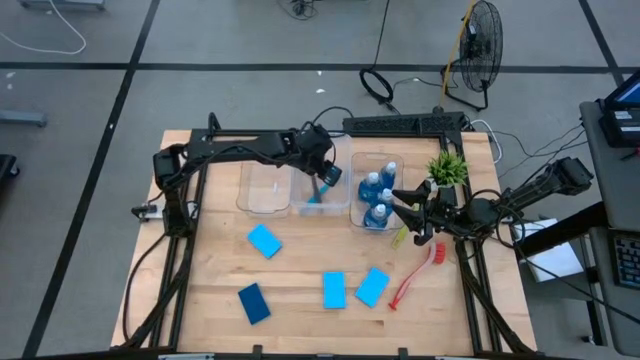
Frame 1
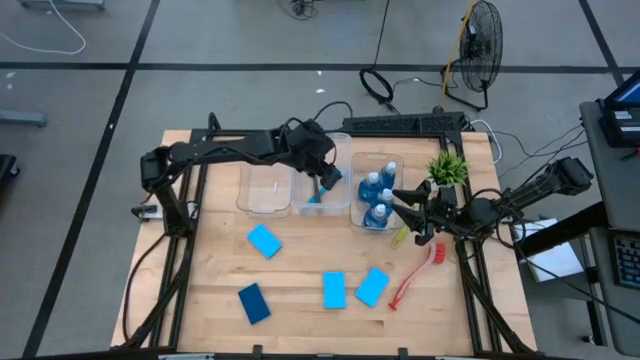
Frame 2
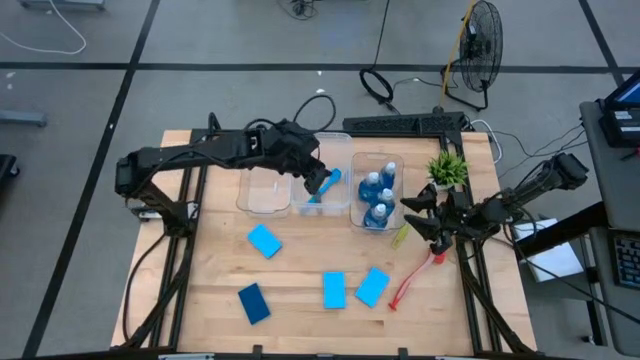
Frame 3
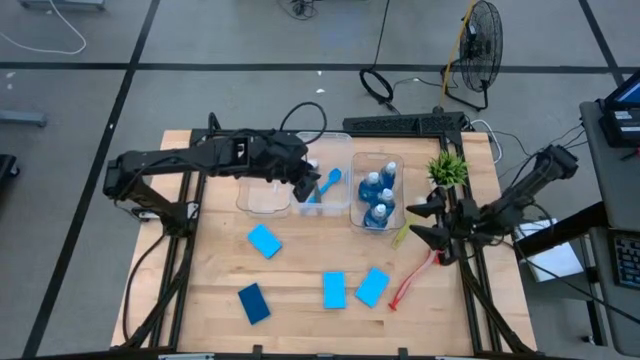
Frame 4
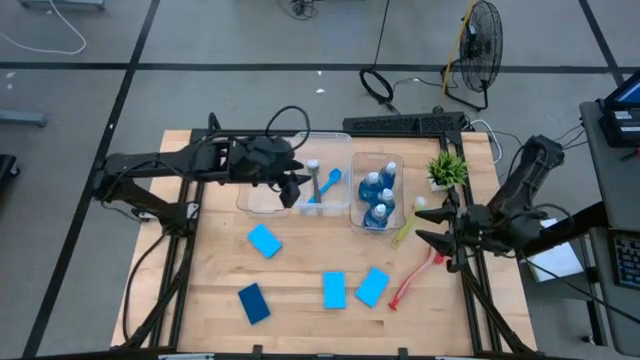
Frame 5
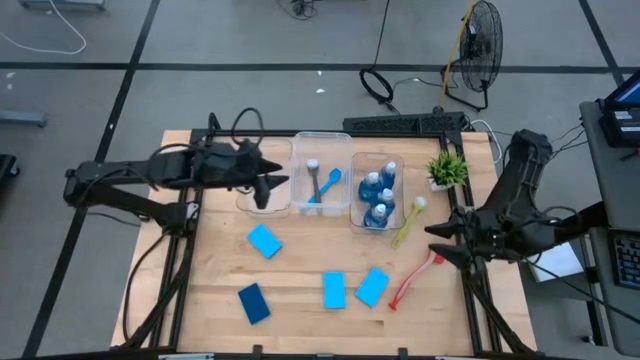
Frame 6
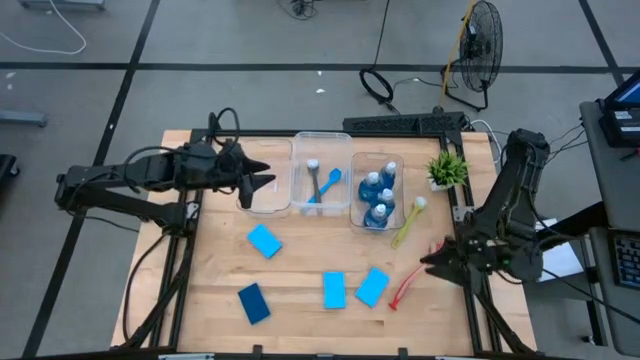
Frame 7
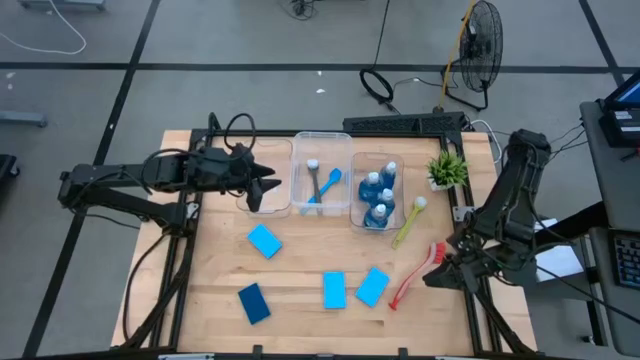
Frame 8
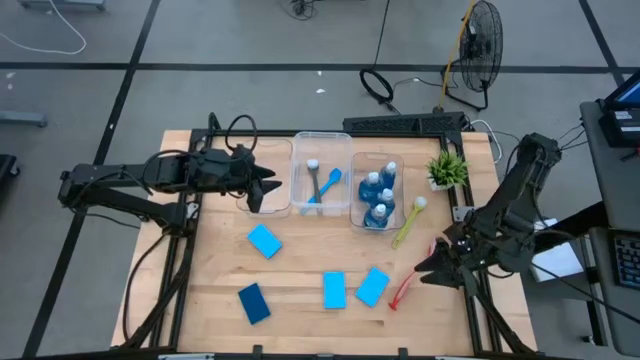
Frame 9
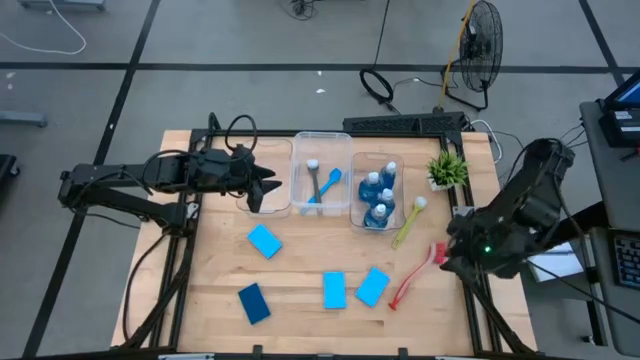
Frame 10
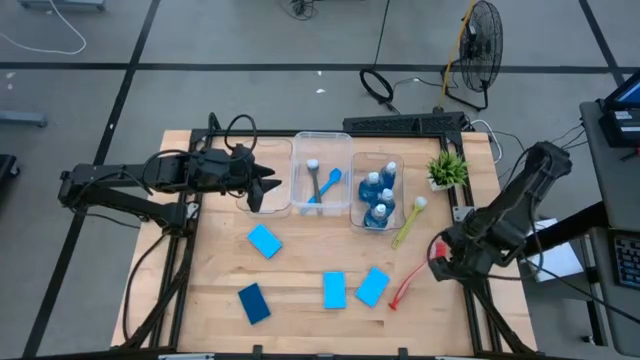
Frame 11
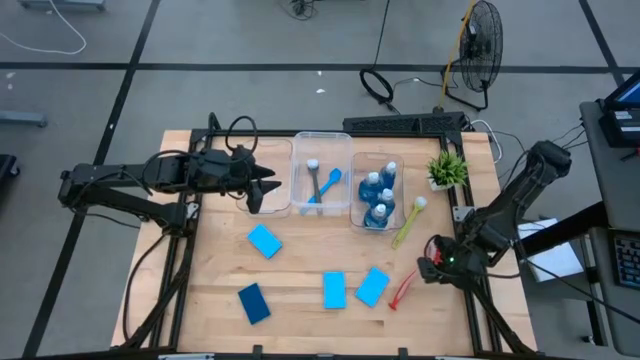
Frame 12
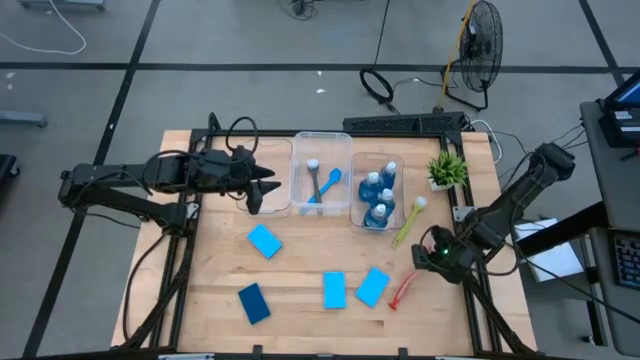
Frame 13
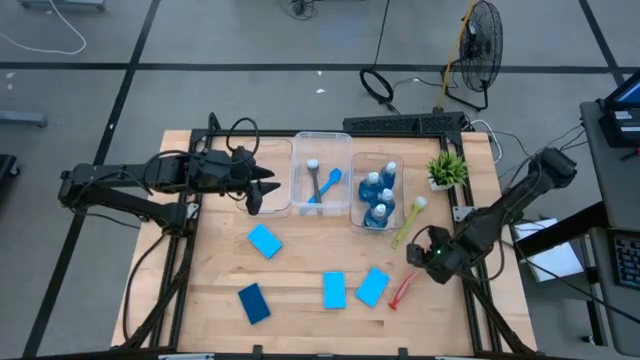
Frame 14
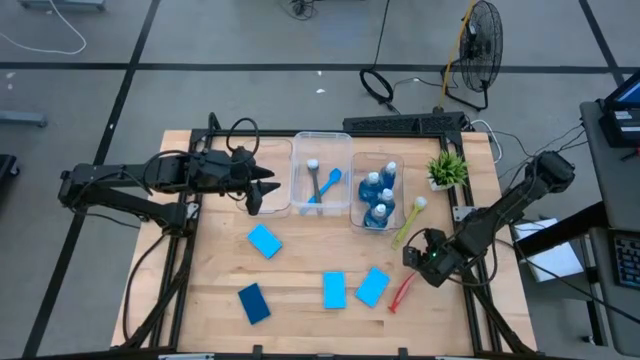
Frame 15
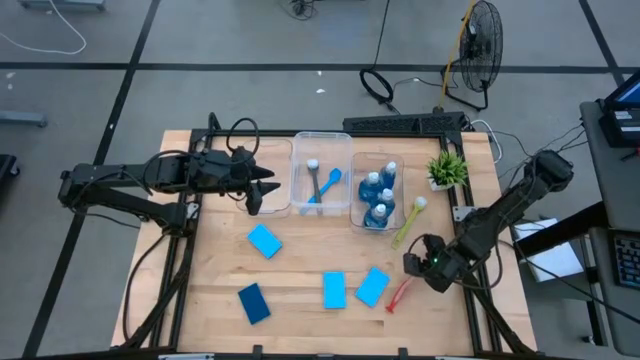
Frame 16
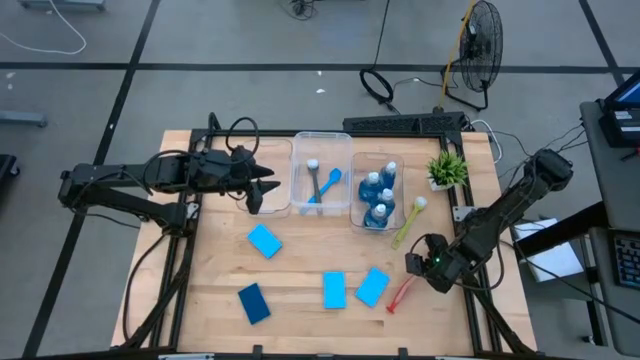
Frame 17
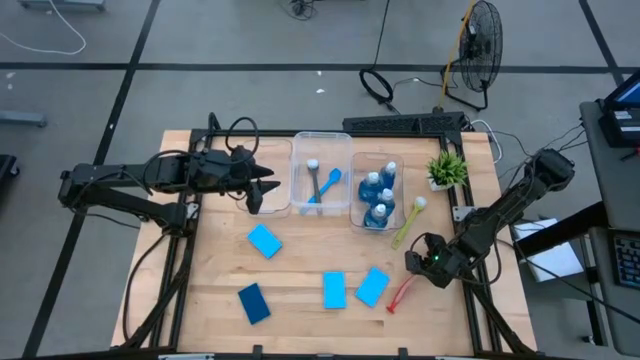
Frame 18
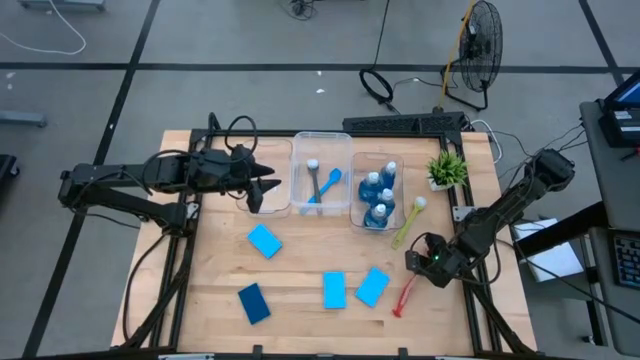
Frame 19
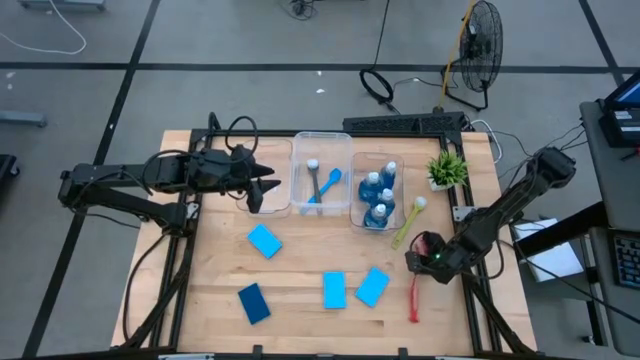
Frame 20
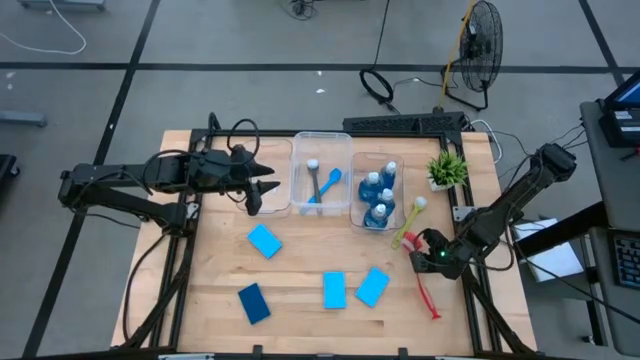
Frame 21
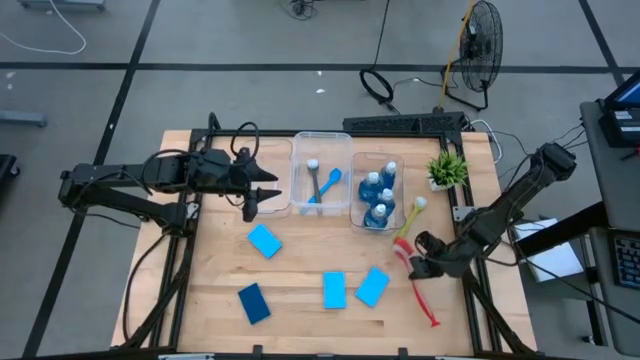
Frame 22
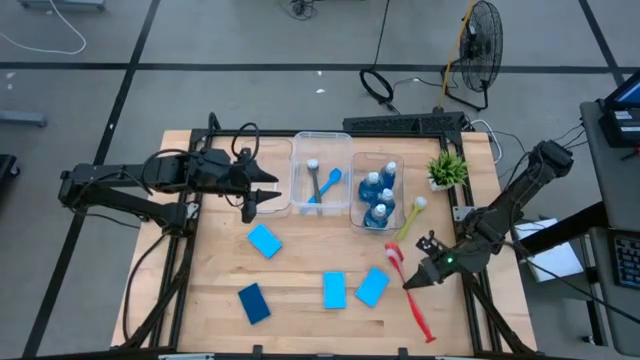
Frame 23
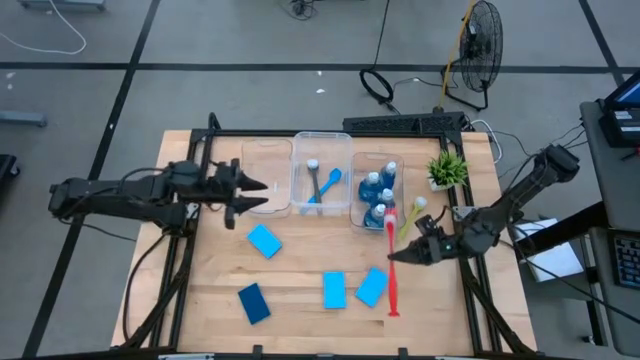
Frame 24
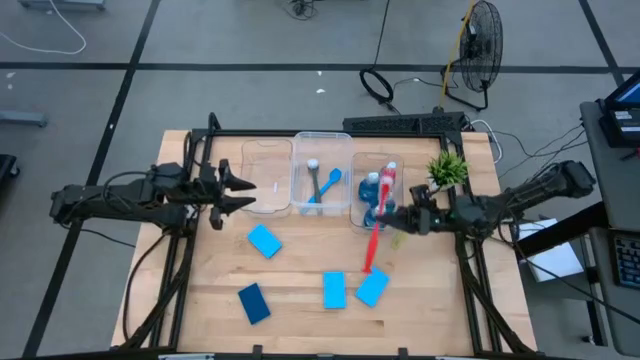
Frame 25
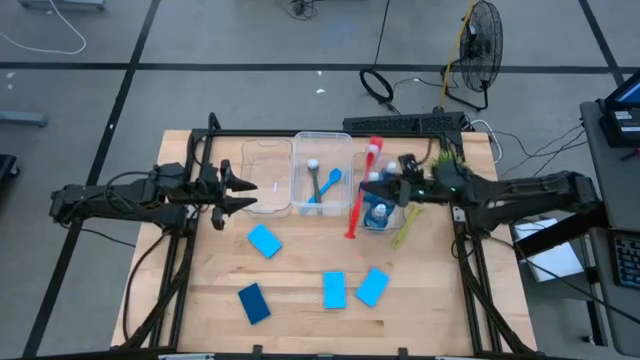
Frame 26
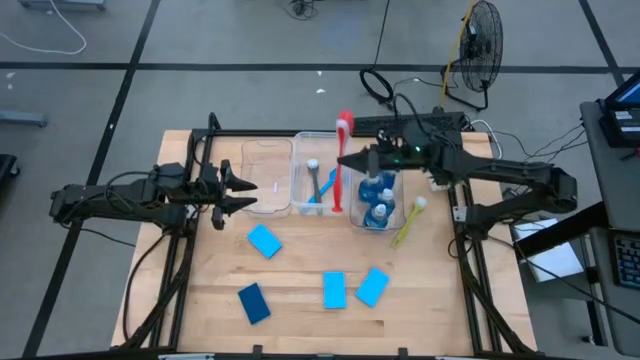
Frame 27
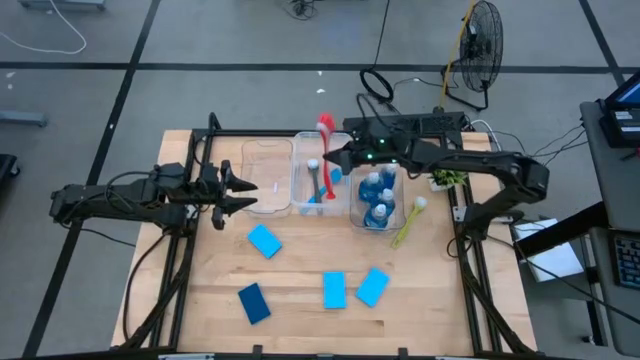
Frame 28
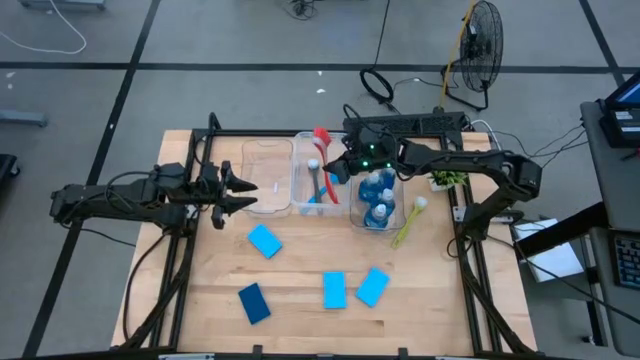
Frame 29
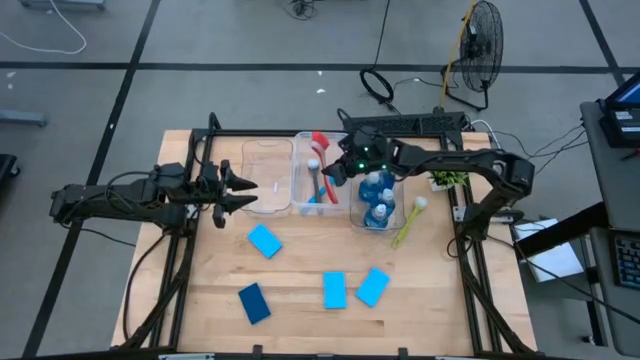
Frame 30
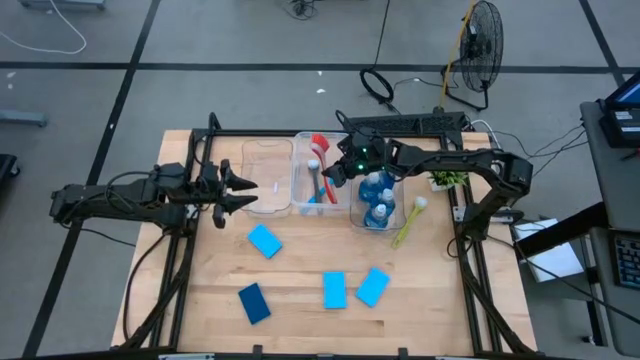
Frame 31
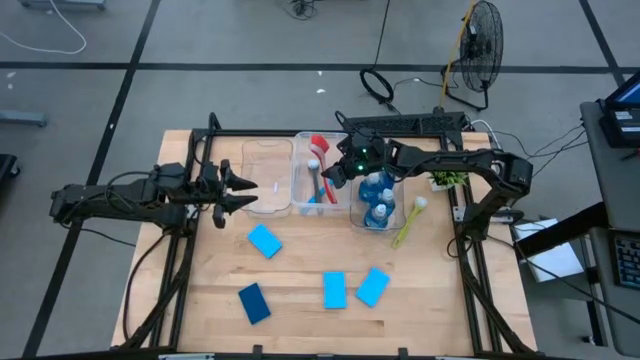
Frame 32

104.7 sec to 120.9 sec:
Task: Pick & Place Kitchen Sink Supplies
Put the red dish brush into the white transparent bin

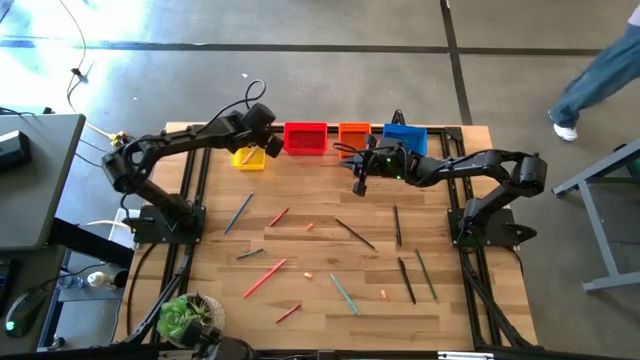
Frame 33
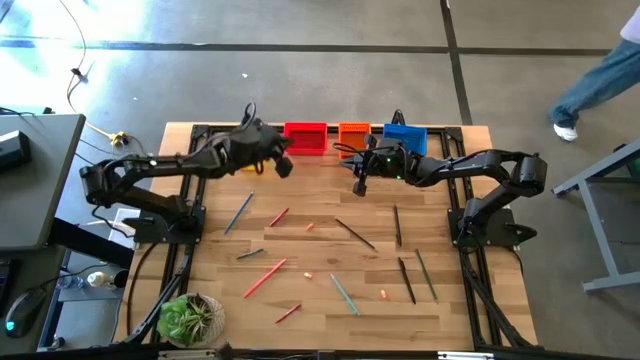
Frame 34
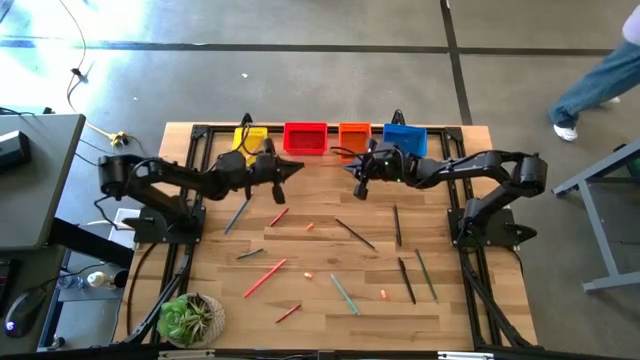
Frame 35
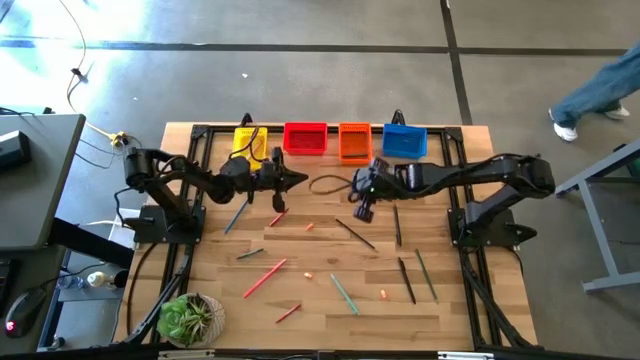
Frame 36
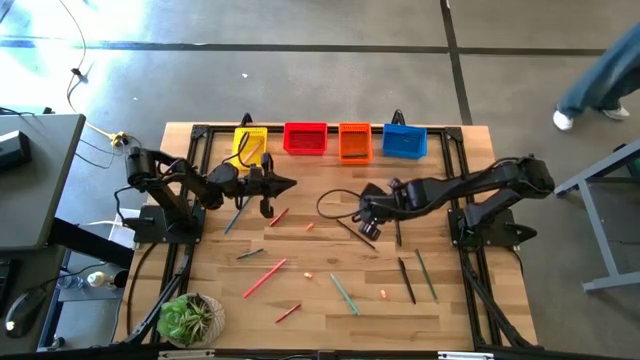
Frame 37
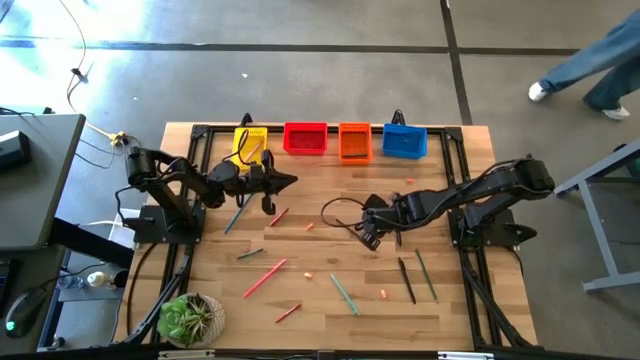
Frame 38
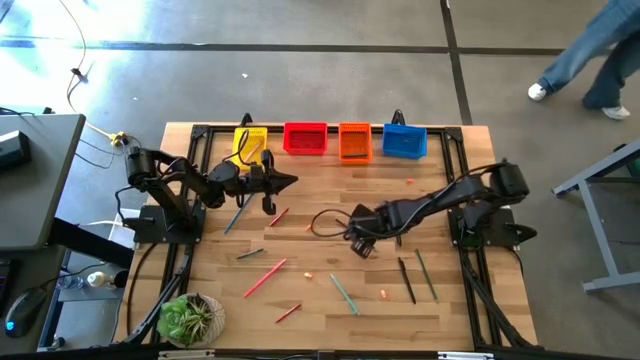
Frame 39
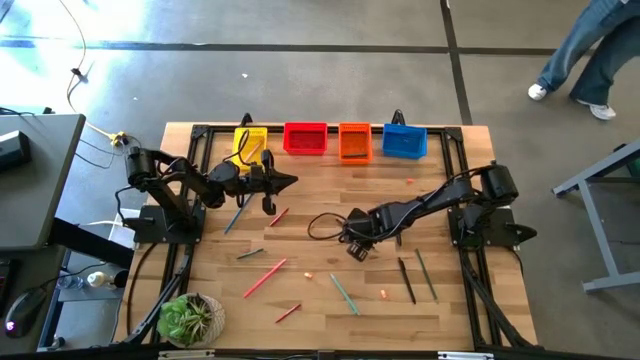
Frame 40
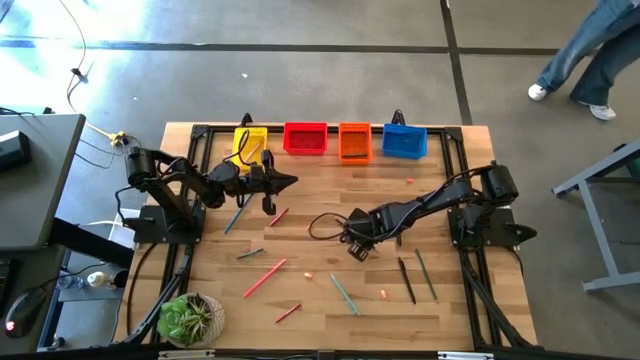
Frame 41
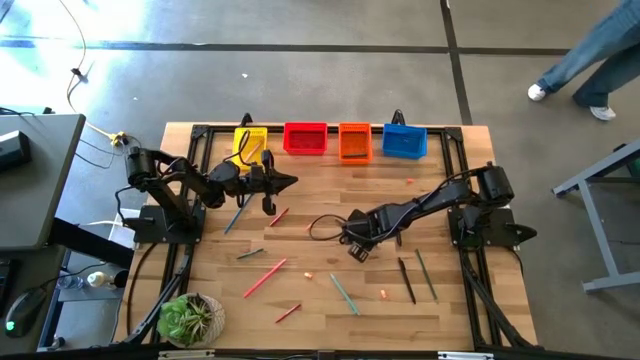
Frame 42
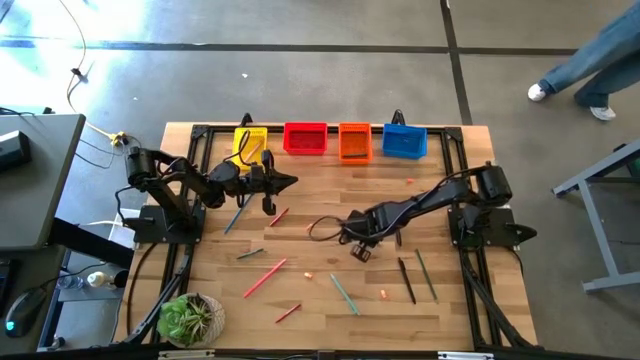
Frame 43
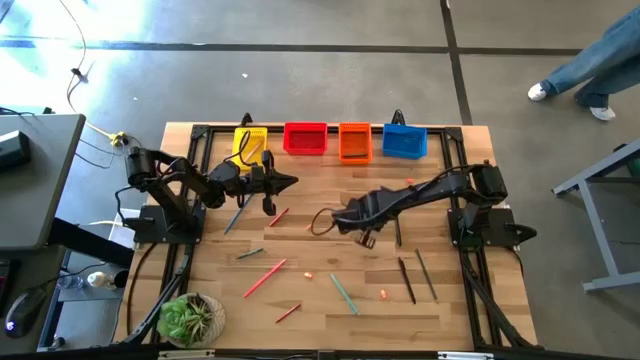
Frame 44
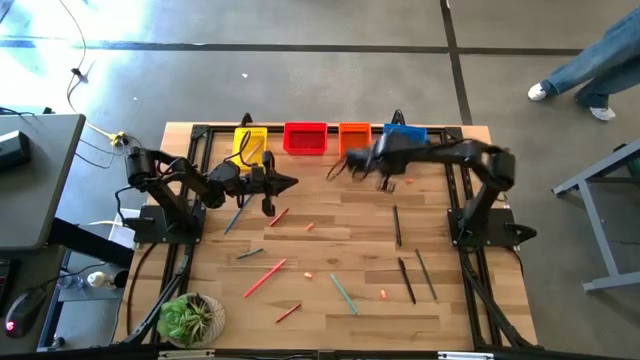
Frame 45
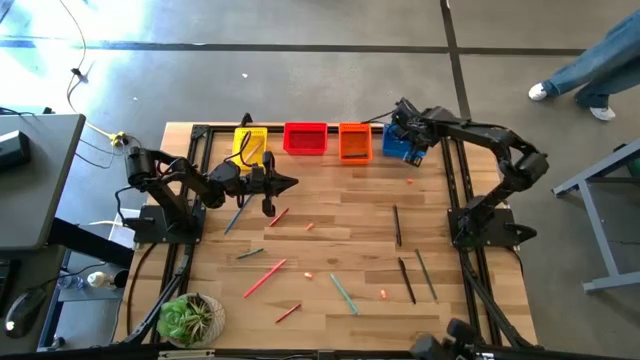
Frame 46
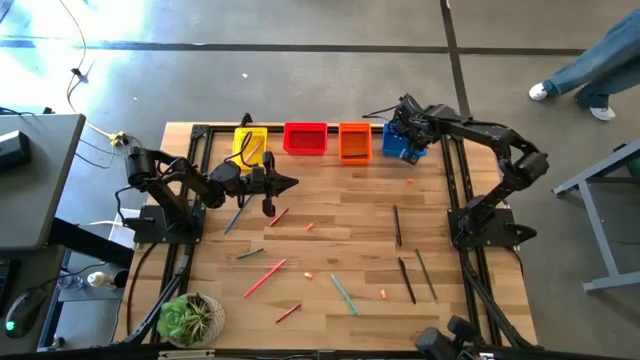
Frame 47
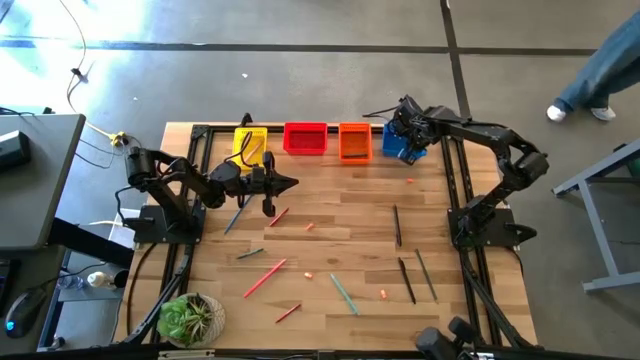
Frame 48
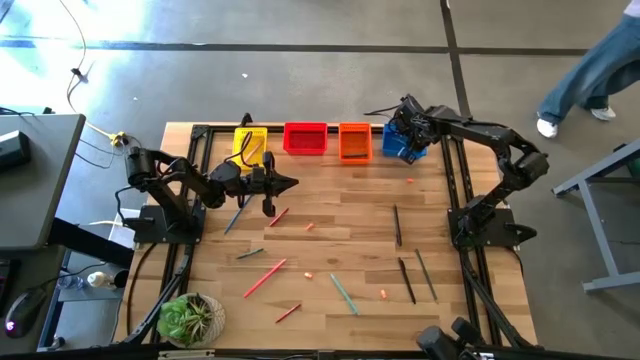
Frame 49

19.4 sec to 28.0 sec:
Task: Sort crayons/erasers/pens/pencils in bins
Put the blue pencil into the blue basket
